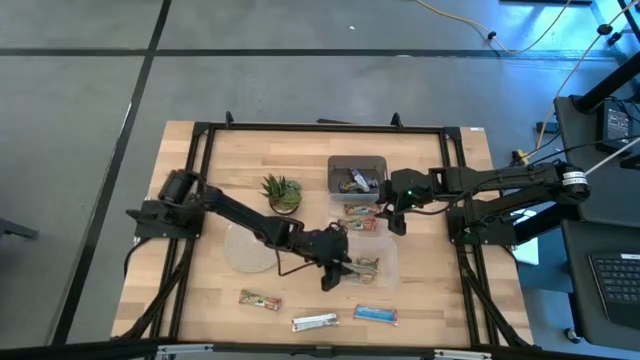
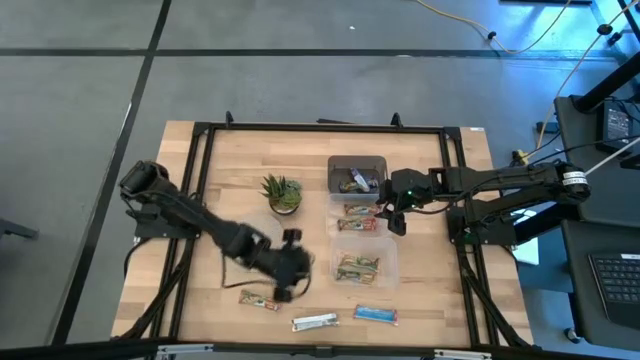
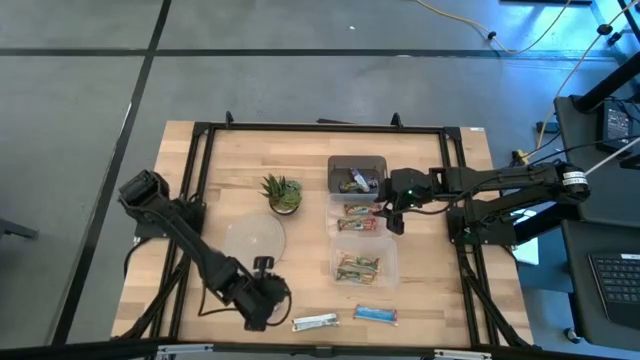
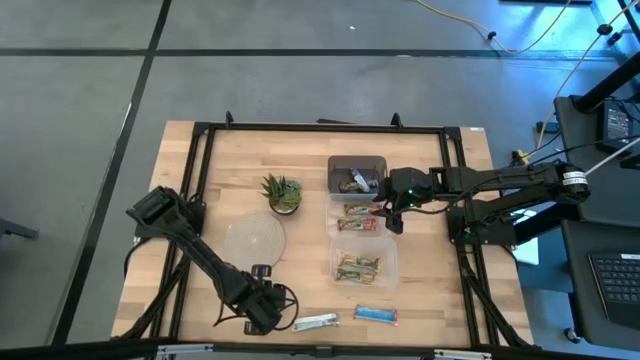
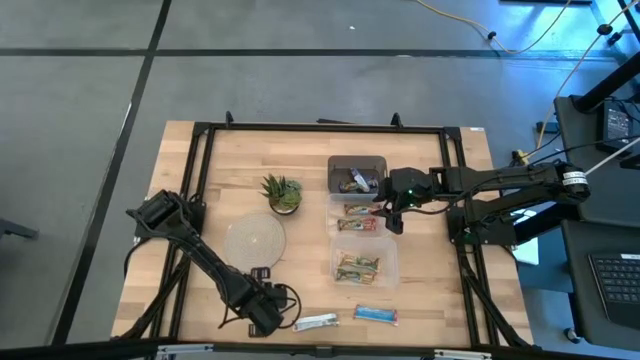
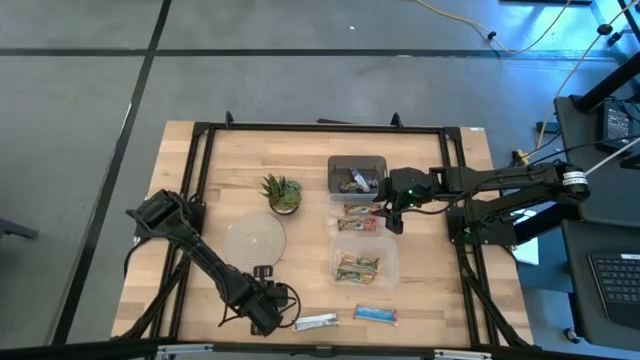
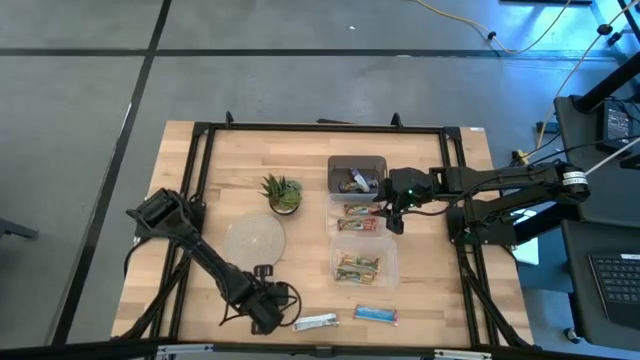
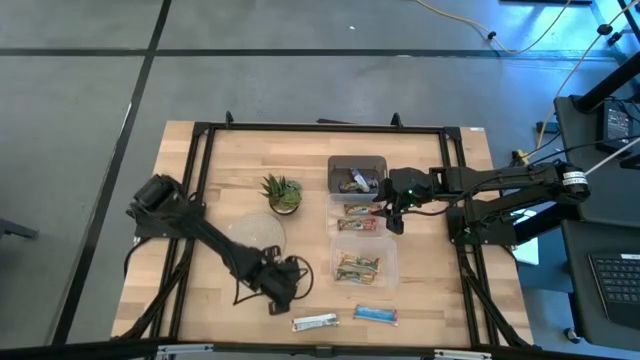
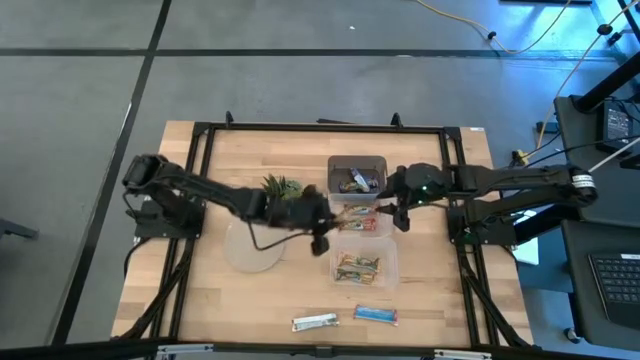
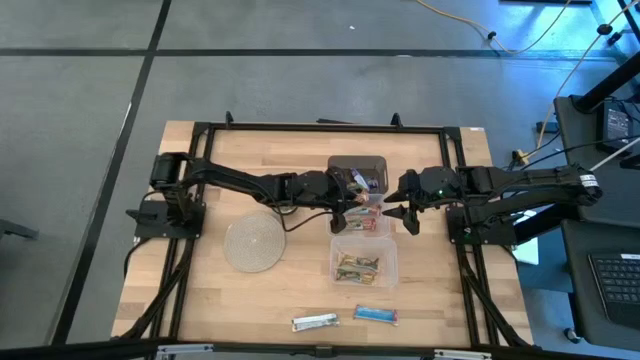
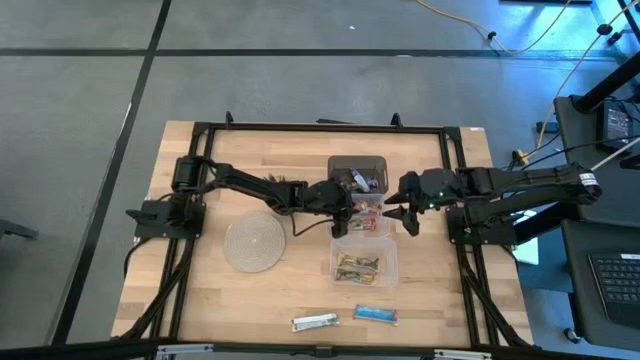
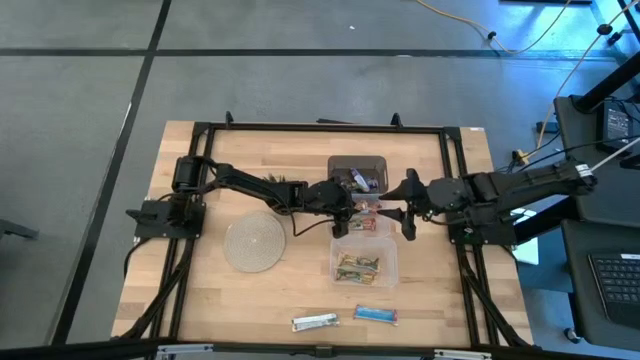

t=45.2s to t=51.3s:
Task: Pick and place Granola Bars by type
Put the red granola bar into the top transparent bin

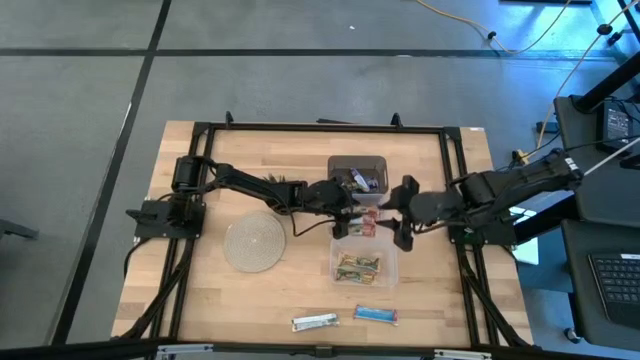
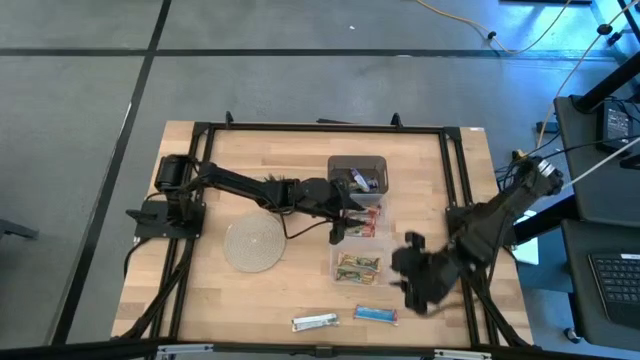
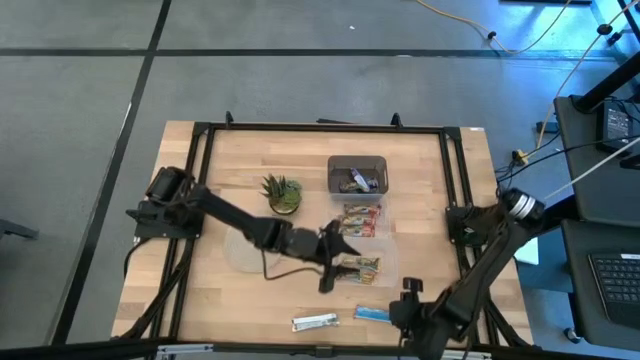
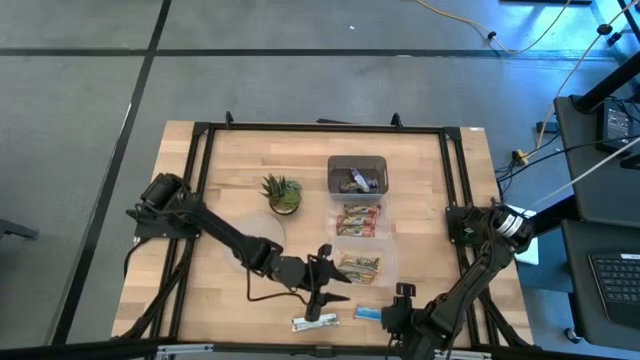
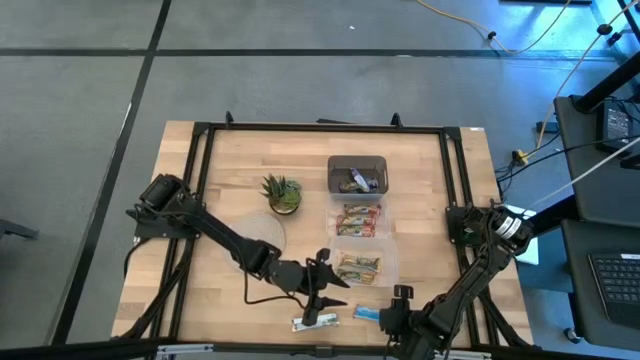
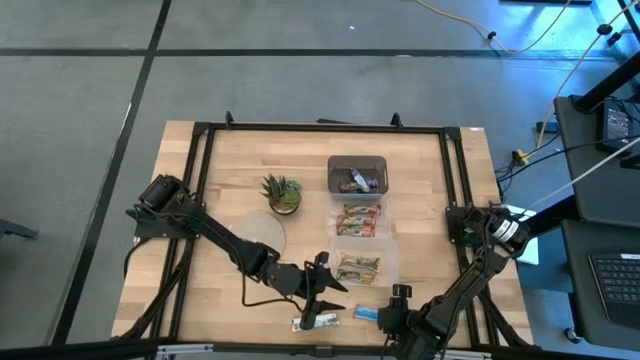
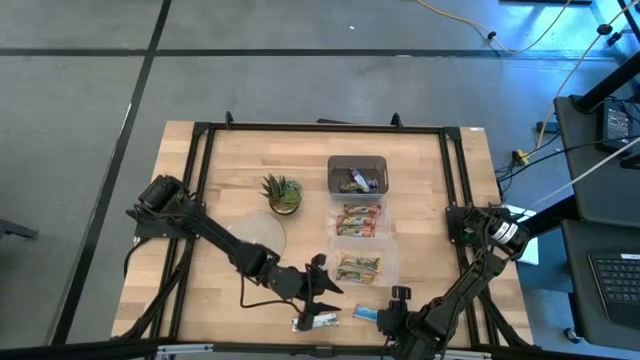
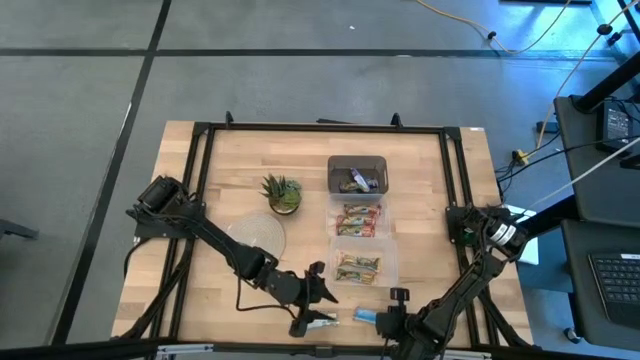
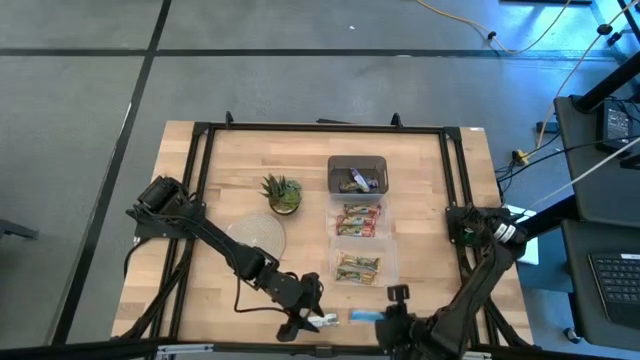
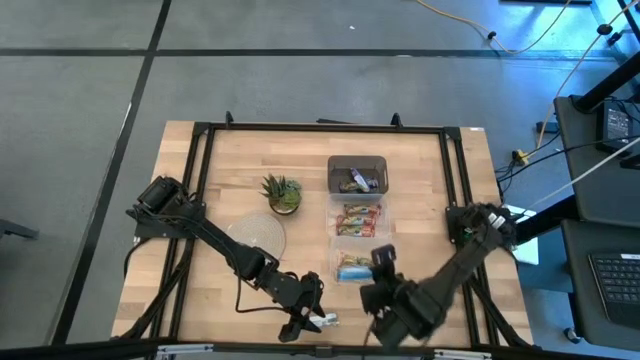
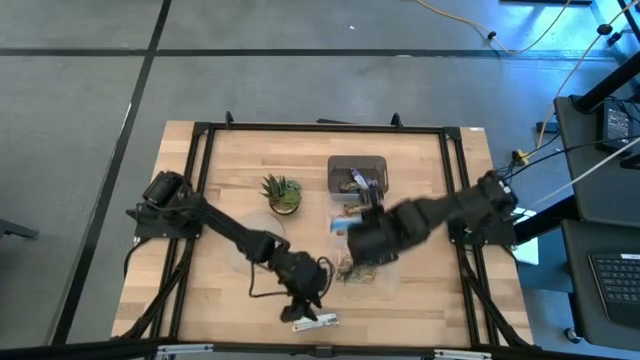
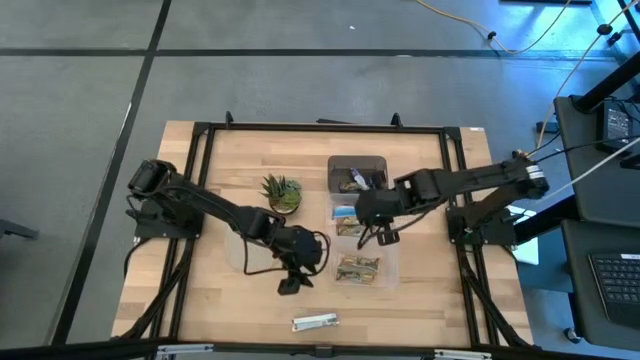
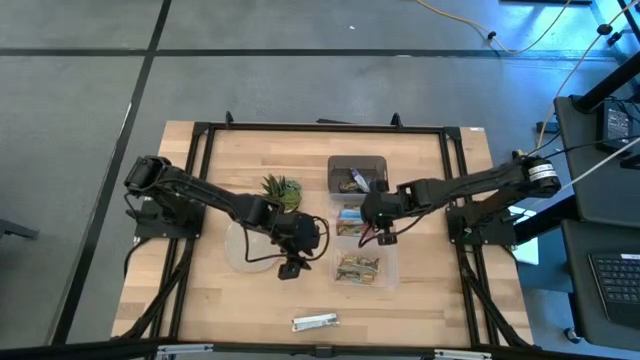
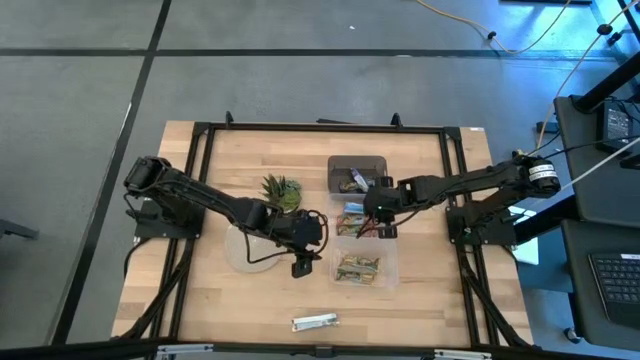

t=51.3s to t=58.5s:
Put the red granola bar into the top transparent bin

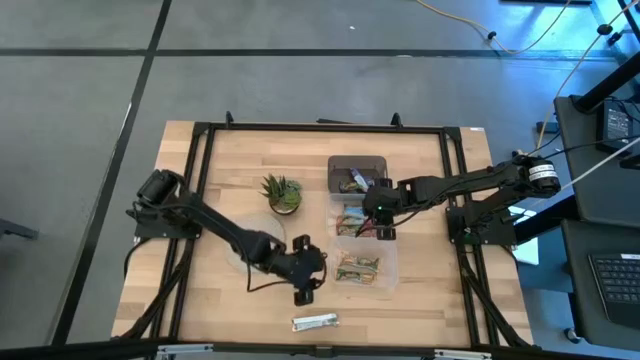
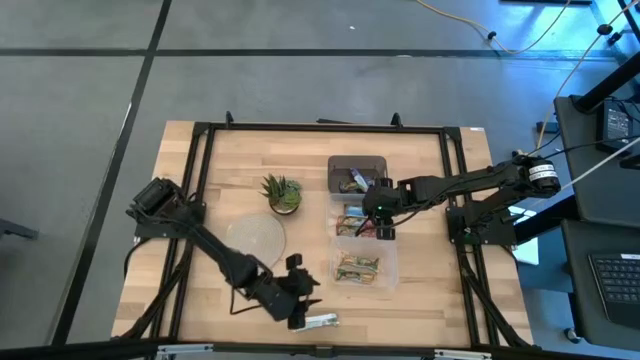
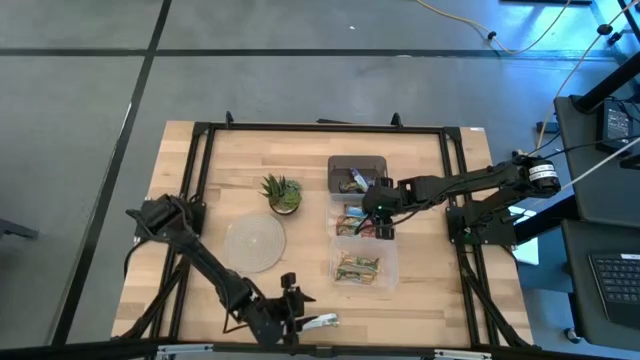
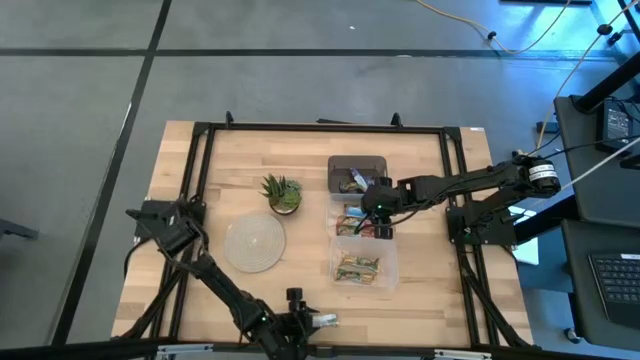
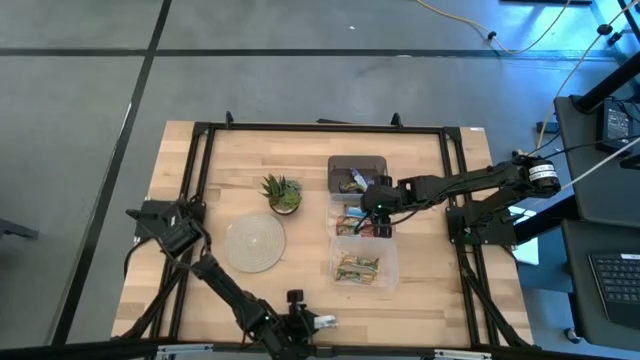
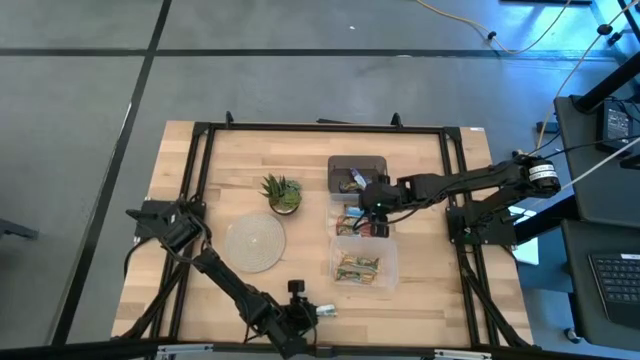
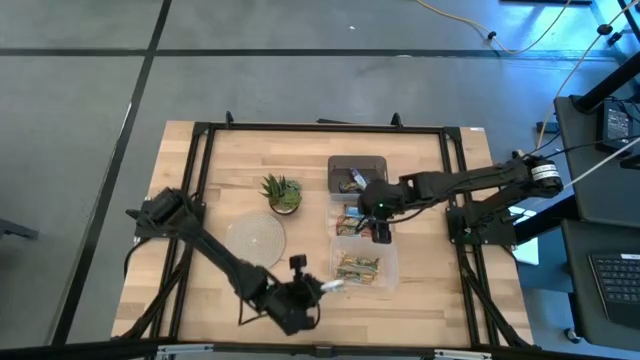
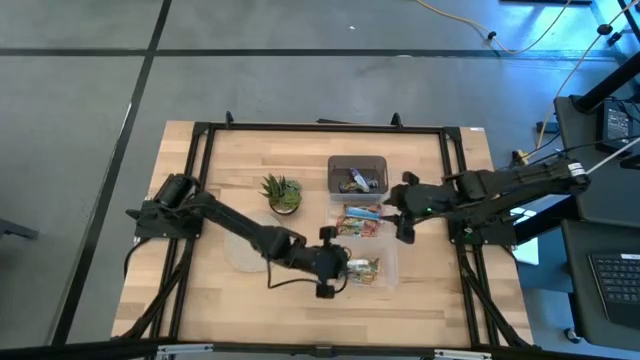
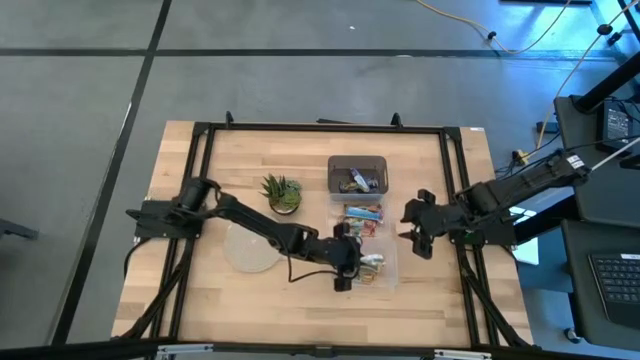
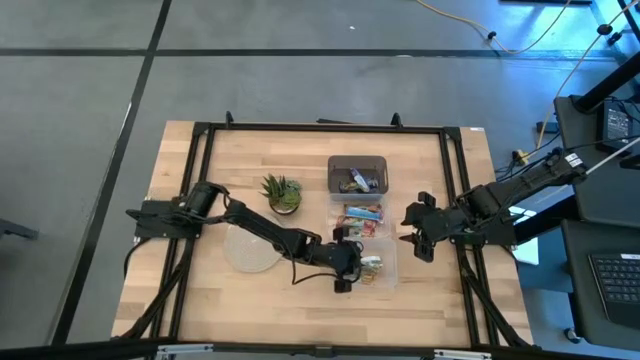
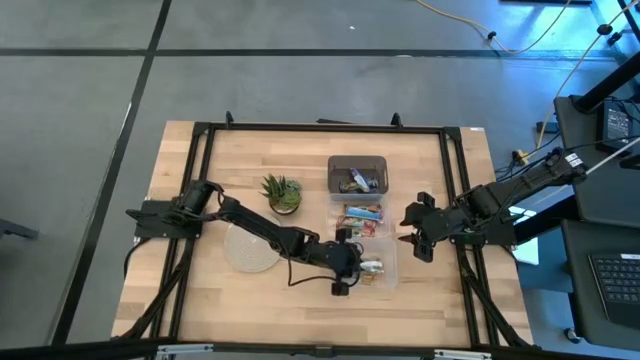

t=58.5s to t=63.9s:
Put the yellow granola bar into the bottom transparent bin

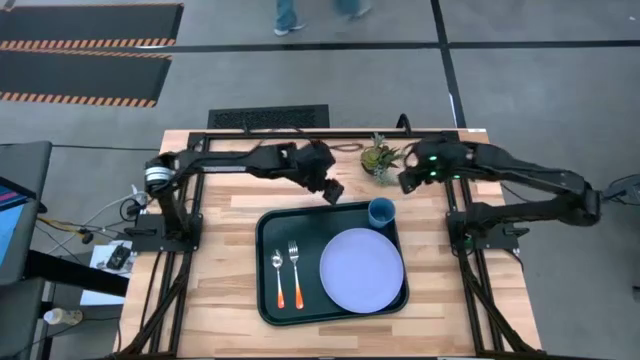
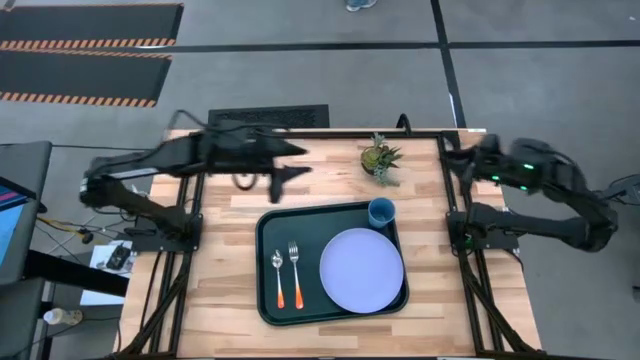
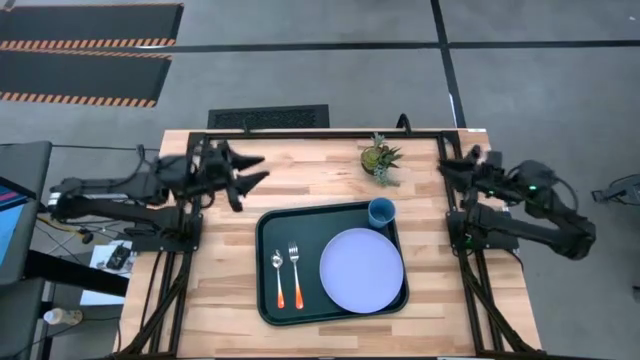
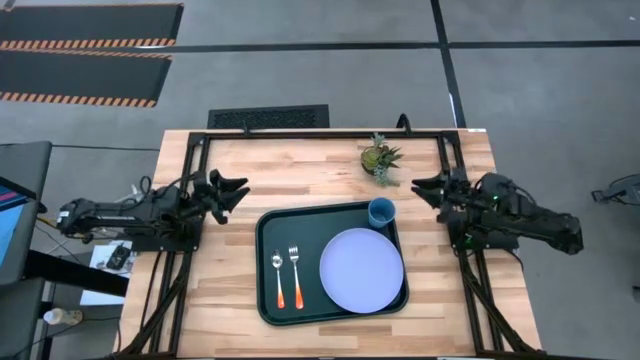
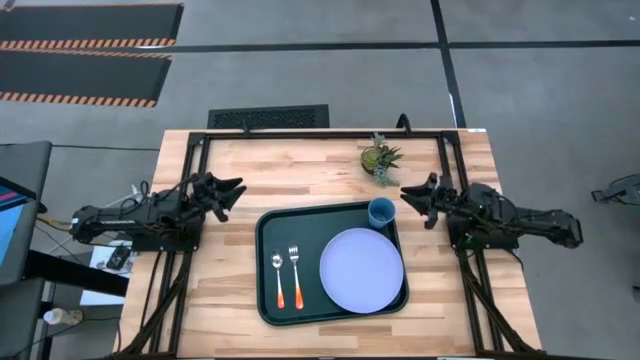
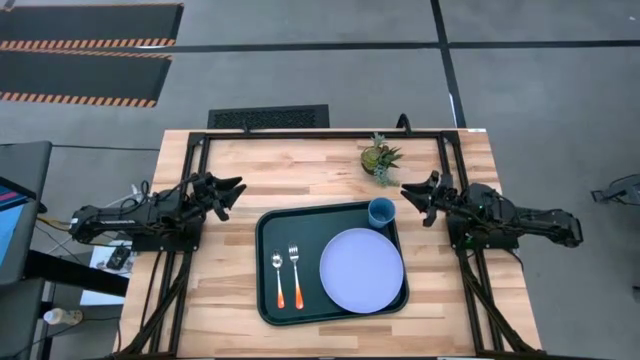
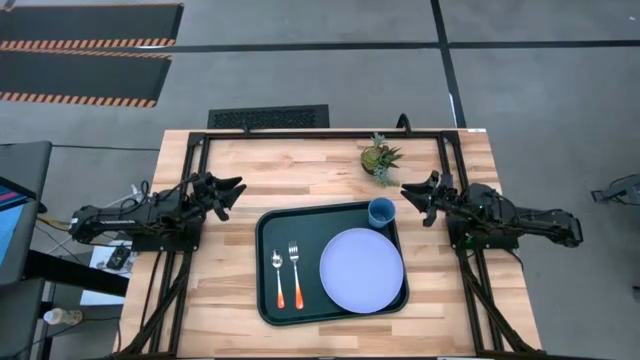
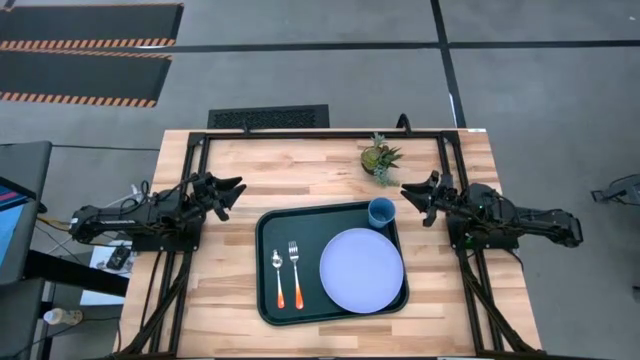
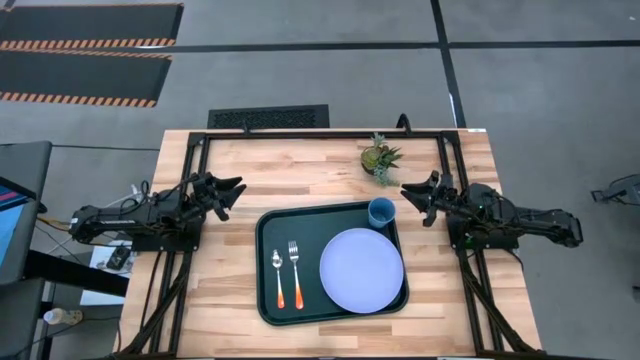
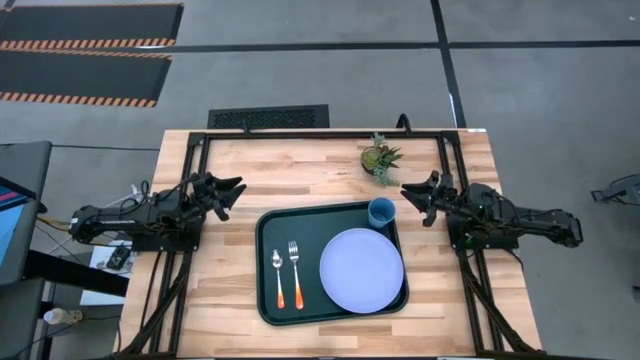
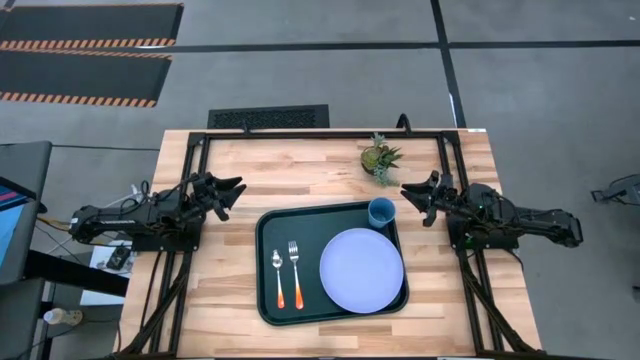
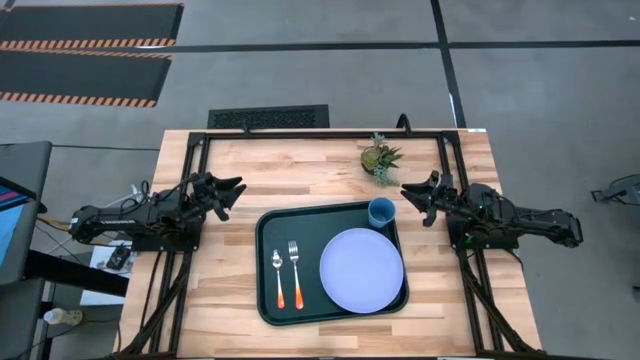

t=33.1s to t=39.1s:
Task: Pick and place plate/cup/fork/spoon on tray
Return to Home Position
